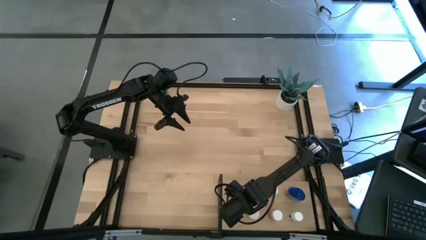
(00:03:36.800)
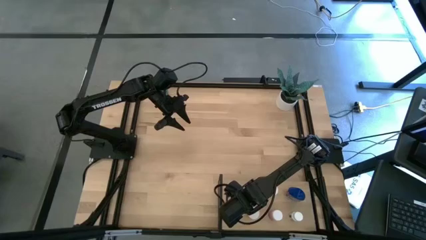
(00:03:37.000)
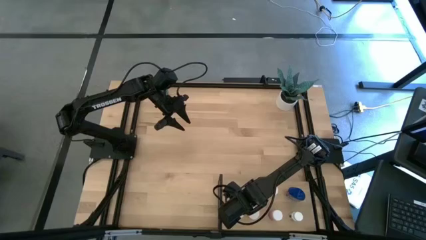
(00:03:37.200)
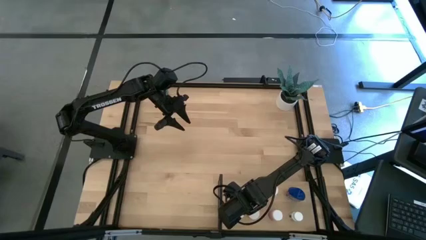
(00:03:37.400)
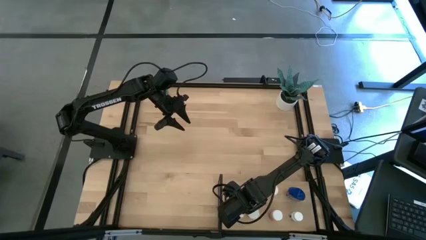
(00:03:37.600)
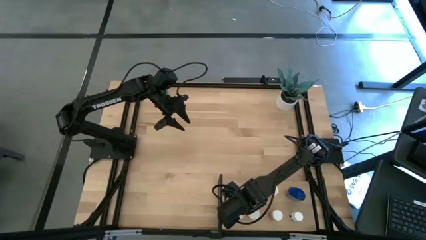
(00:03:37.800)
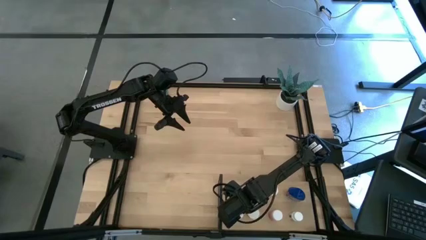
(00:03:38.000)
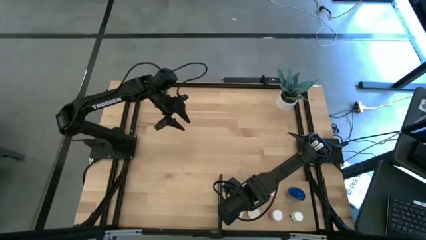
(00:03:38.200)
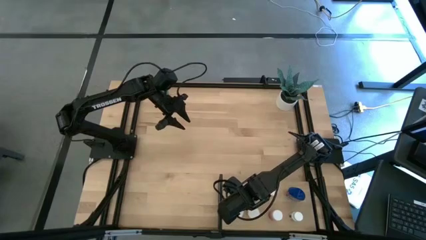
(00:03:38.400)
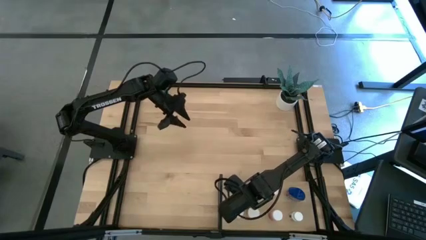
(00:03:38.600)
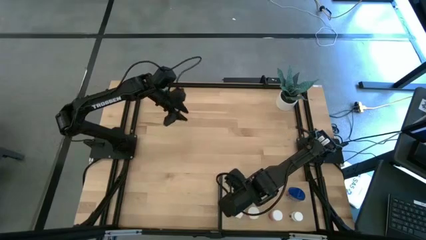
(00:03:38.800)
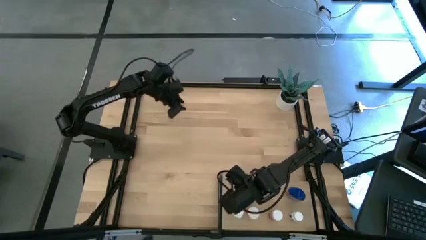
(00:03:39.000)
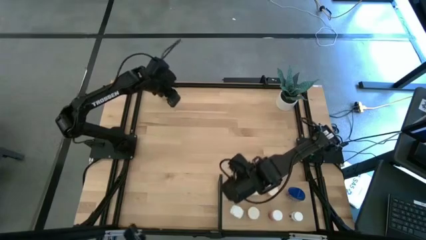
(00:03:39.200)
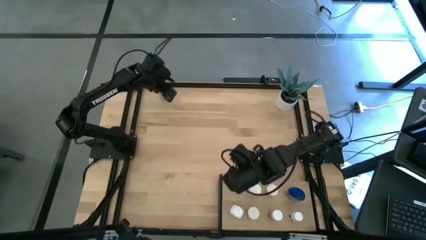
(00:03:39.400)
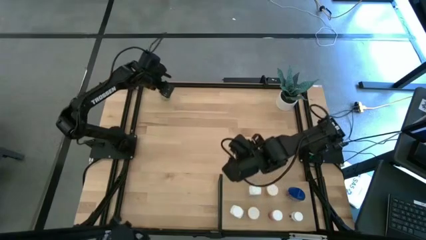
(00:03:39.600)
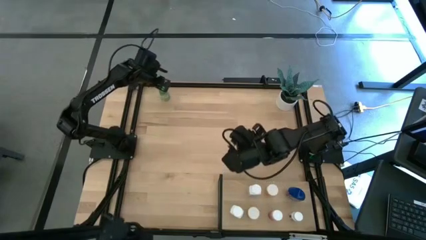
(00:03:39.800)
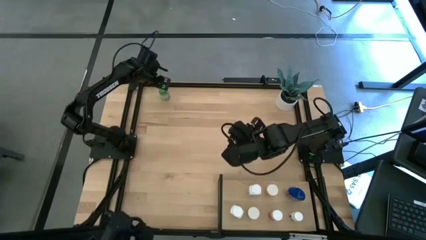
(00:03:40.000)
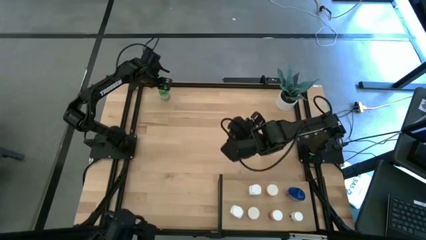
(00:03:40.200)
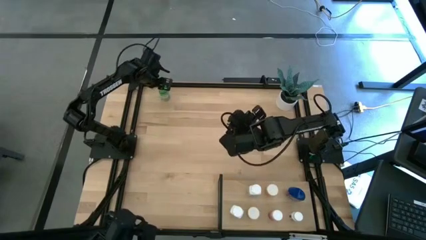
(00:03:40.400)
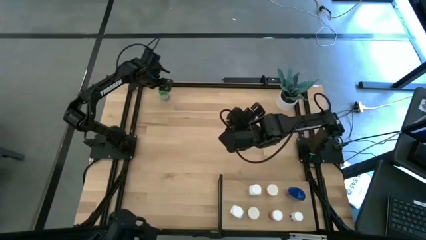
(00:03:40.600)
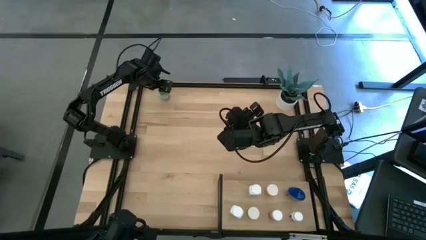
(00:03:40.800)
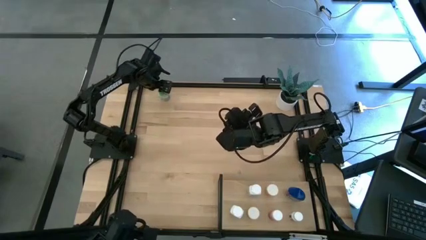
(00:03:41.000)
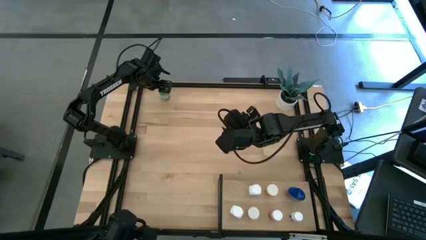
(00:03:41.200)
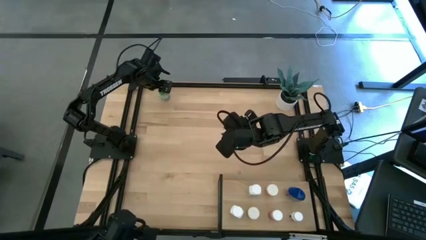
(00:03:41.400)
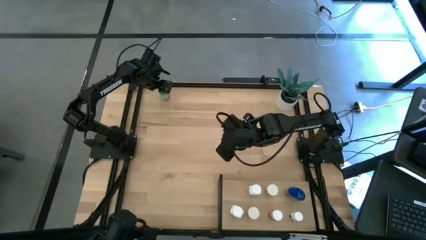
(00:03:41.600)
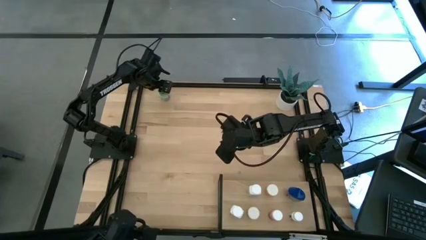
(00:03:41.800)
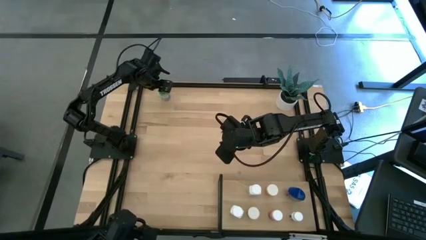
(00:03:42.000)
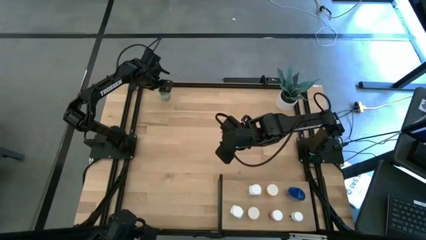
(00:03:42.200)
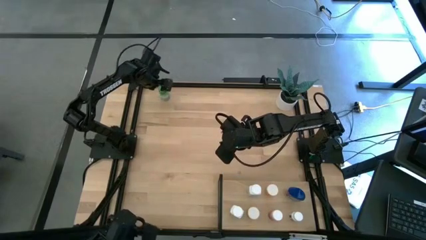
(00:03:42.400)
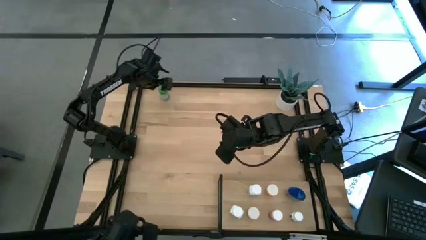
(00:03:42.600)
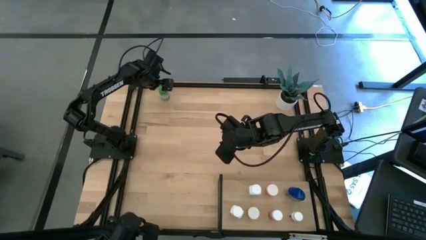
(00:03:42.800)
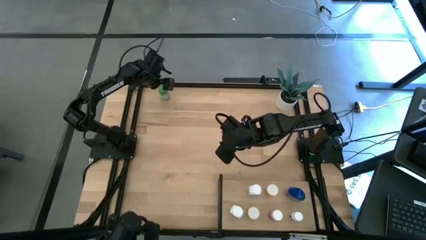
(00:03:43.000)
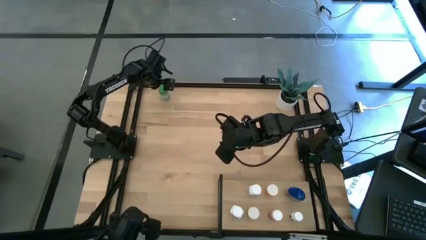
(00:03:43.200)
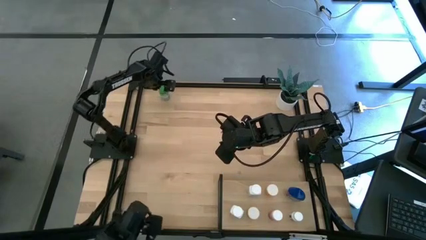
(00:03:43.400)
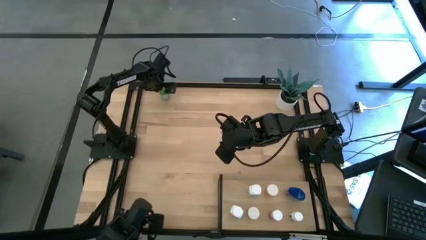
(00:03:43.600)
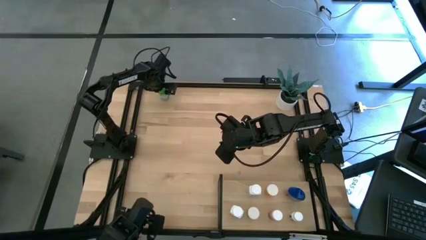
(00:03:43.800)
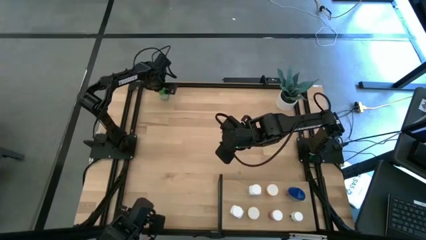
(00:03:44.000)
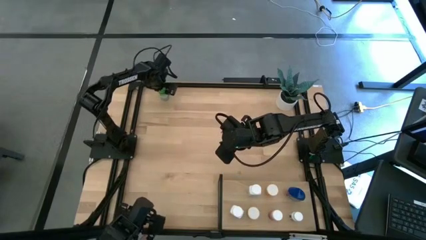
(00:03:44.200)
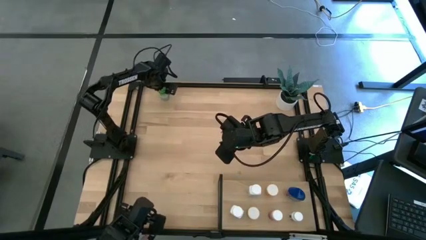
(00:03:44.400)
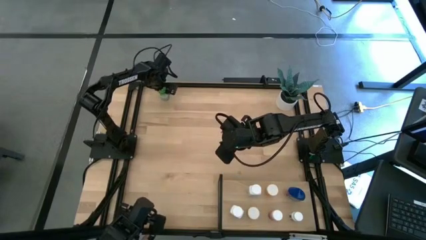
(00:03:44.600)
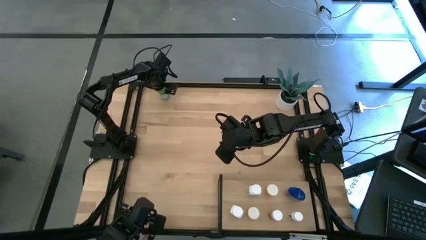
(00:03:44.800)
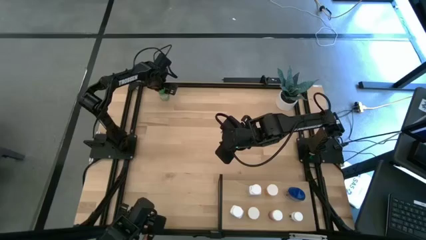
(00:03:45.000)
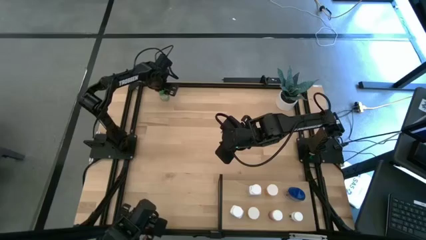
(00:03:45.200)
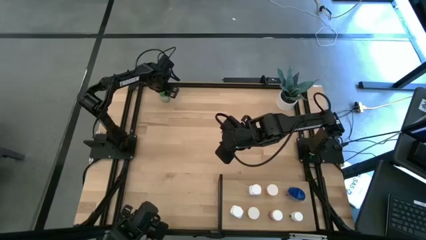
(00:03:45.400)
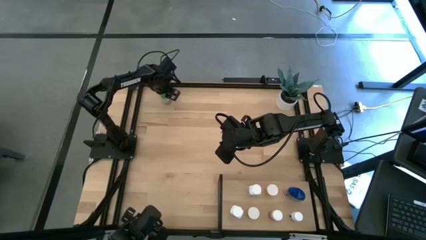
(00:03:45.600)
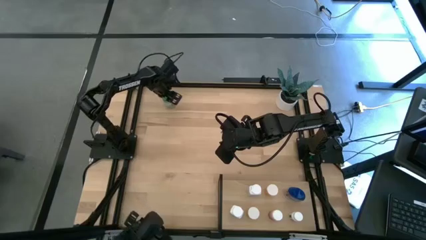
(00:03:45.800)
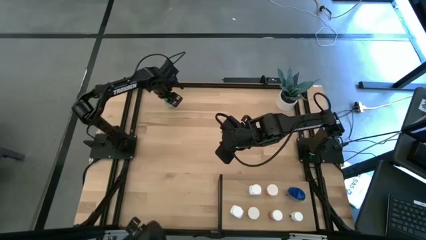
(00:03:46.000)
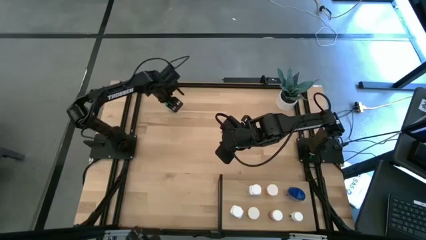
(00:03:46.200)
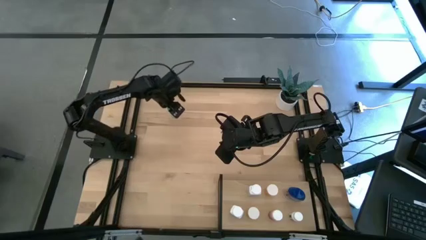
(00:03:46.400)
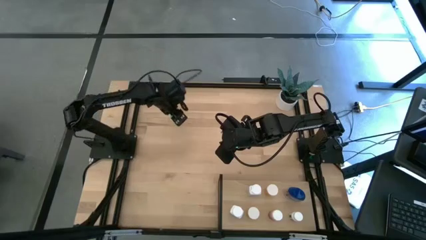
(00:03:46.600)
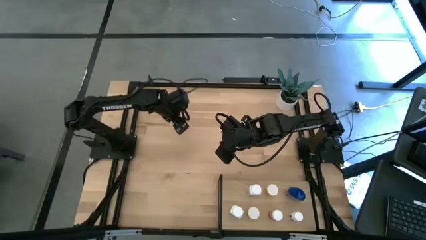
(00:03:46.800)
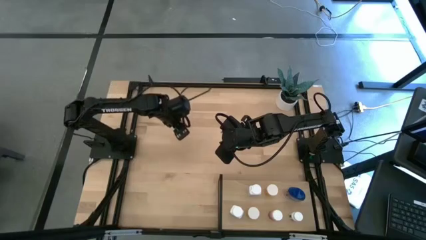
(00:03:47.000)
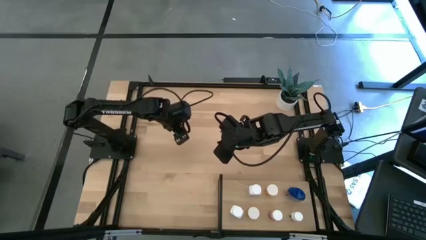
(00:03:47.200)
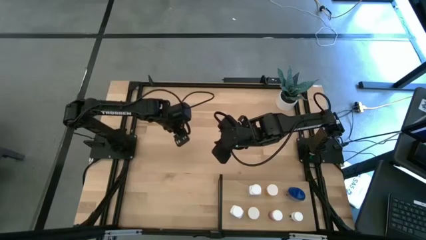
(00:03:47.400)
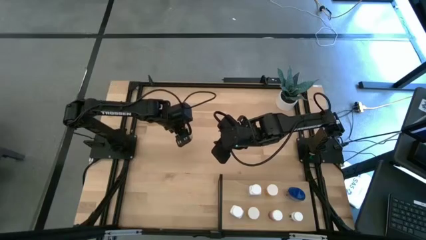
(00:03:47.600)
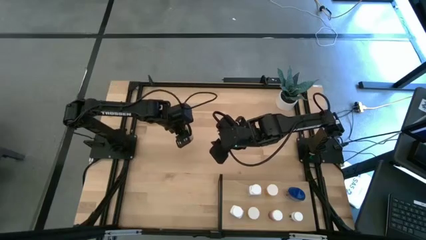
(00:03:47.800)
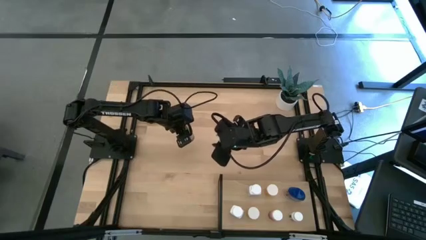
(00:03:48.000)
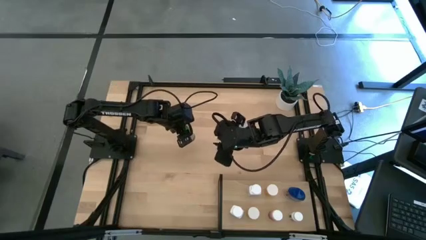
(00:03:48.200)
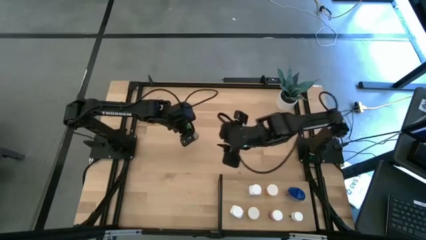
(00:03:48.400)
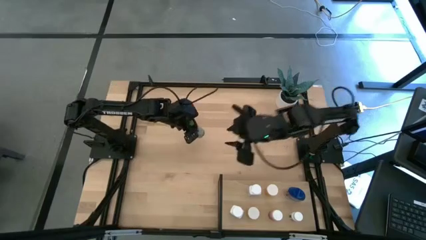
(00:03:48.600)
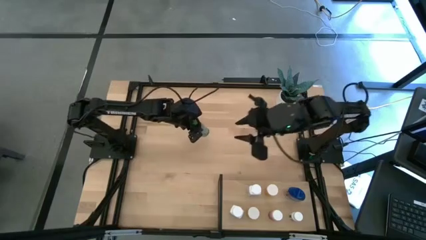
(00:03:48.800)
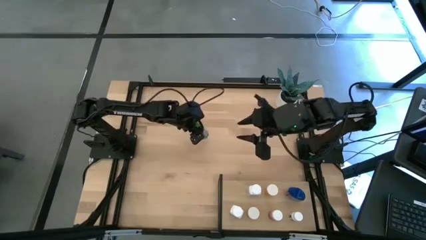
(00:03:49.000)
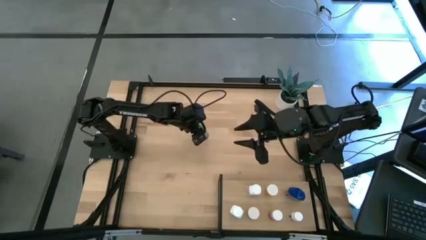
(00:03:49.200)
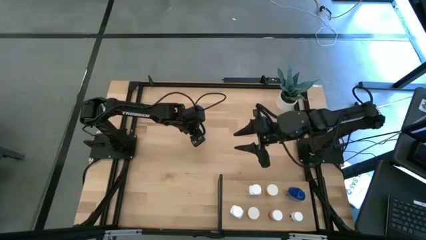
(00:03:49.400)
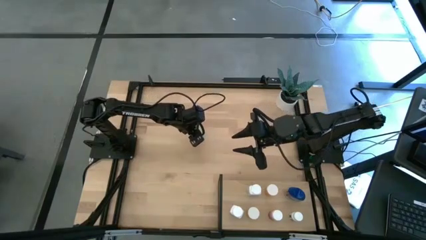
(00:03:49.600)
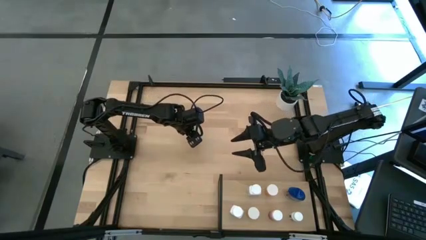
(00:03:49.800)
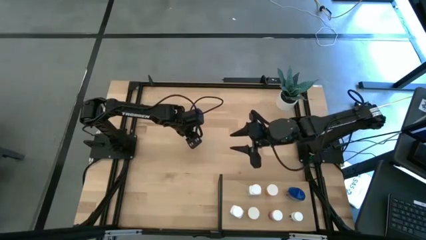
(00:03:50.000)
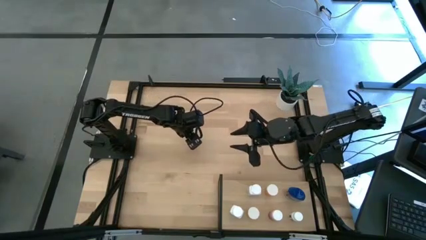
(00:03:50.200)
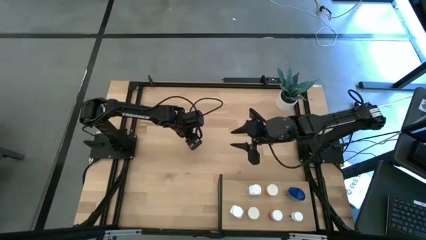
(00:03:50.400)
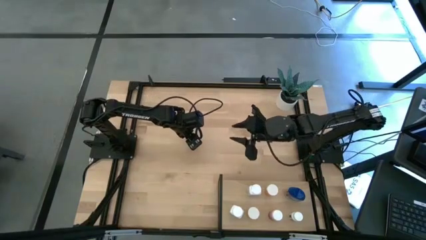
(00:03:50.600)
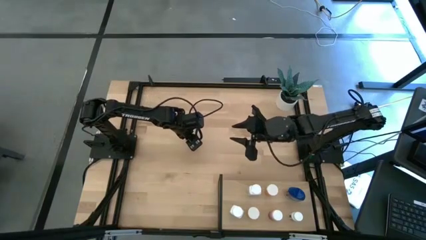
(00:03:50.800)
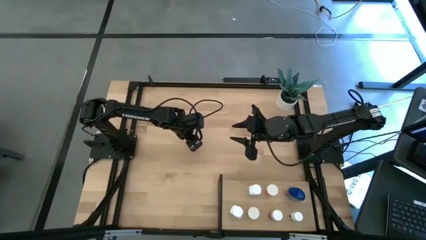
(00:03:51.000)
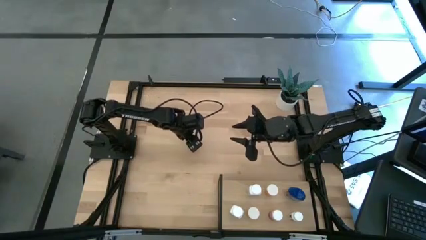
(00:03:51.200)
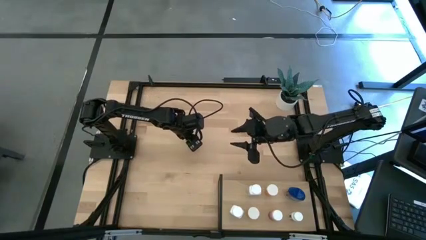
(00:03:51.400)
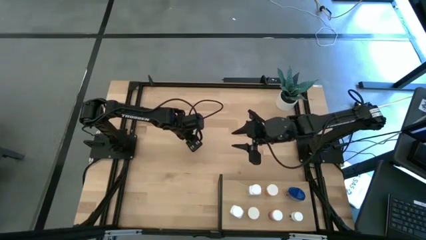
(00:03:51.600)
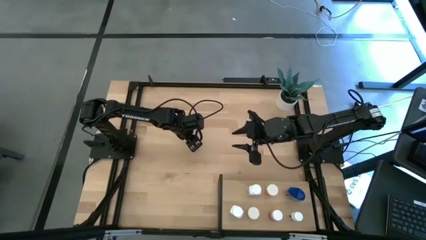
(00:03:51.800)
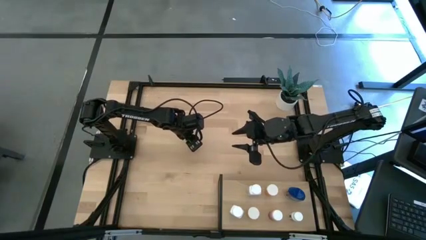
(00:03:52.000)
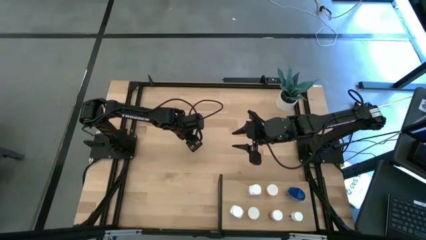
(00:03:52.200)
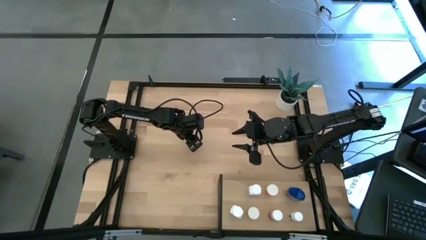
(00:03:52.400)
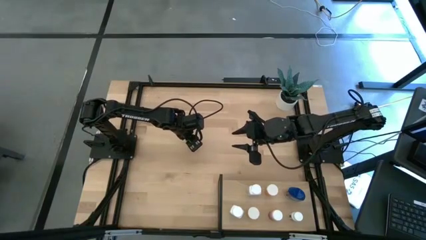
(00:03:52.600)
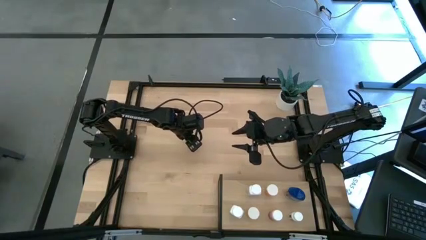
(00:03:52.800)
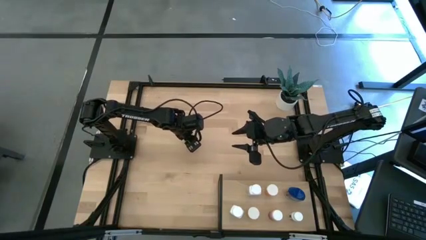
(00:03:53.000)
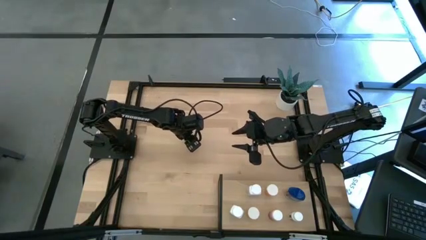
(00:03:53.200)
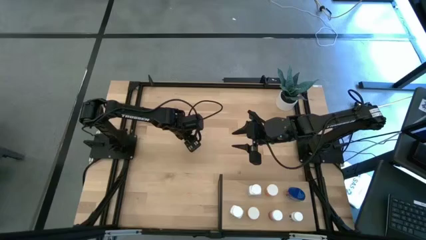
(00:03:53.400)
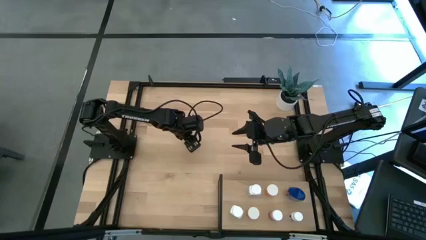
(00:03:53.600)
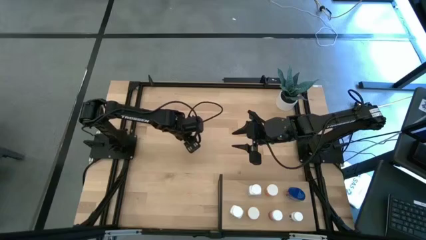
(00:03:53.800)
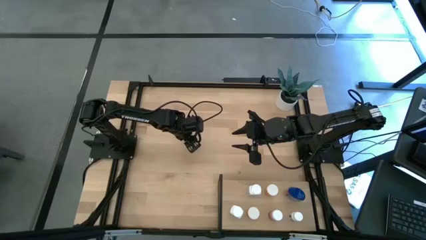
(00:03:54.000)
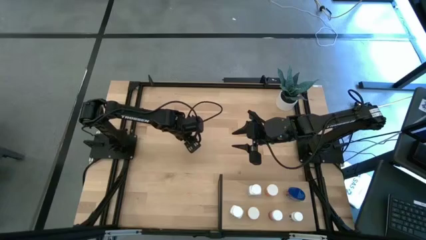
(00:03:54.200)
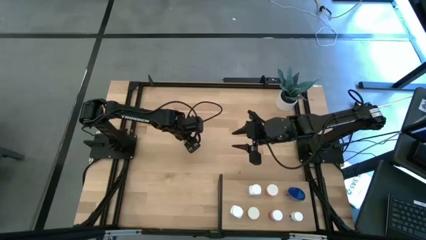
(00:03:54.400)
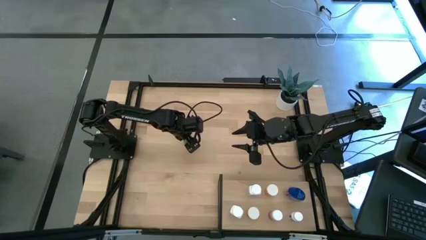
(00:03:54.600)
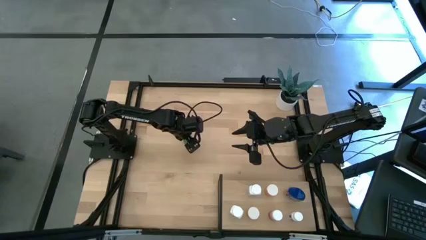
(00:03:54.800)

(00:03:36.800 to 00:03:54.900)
Task: Pick and place medicine bottles onto shelf by color
Move the green pill bottle from the top to the center
